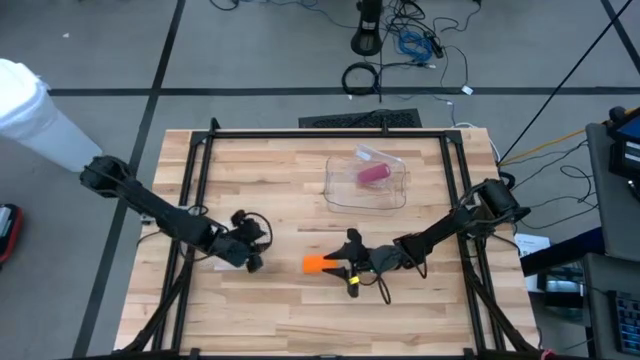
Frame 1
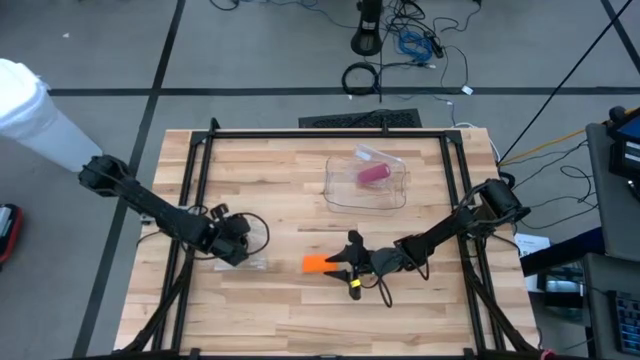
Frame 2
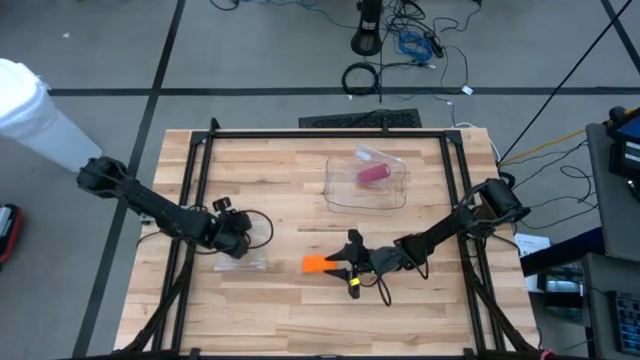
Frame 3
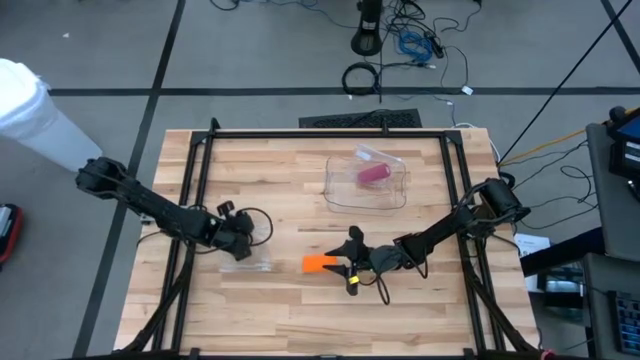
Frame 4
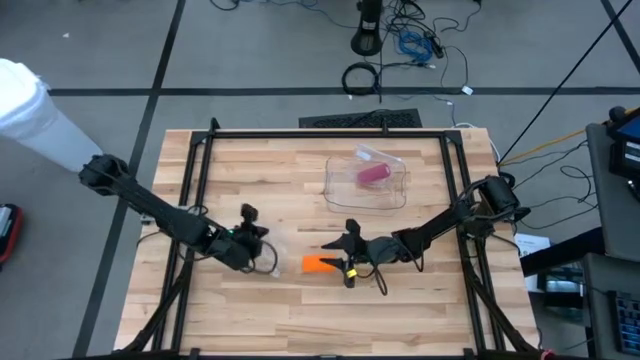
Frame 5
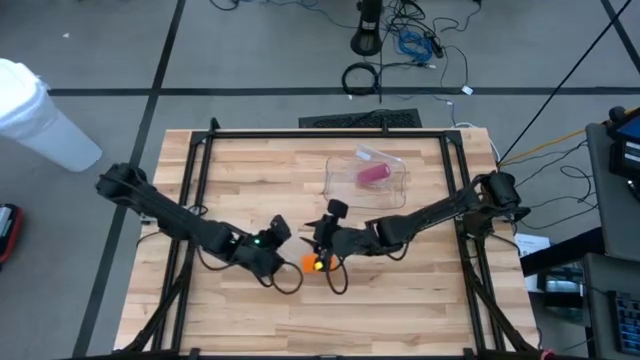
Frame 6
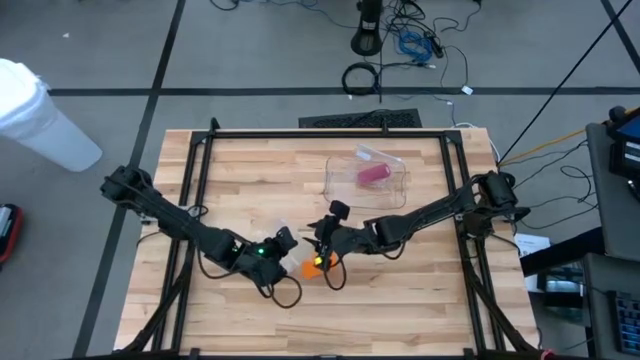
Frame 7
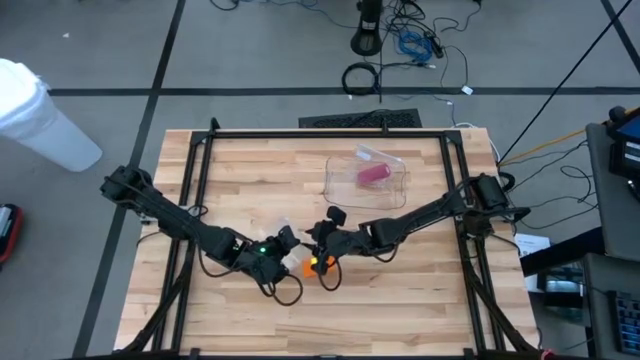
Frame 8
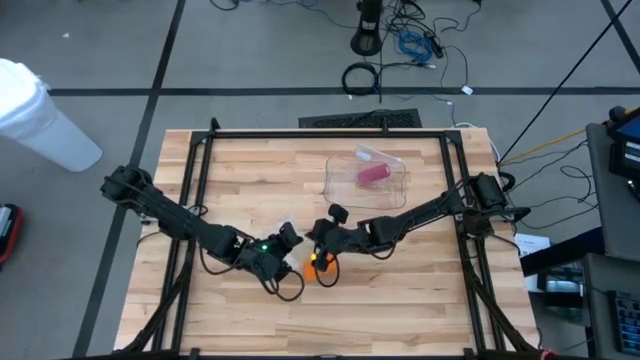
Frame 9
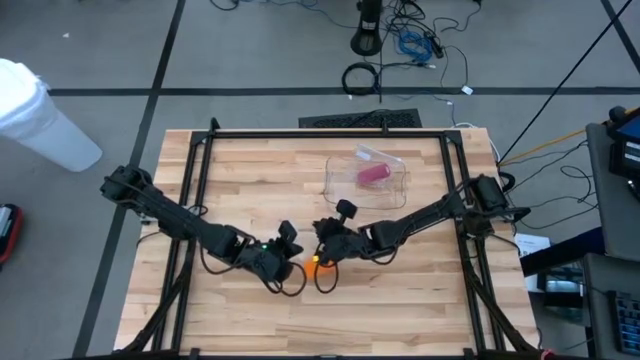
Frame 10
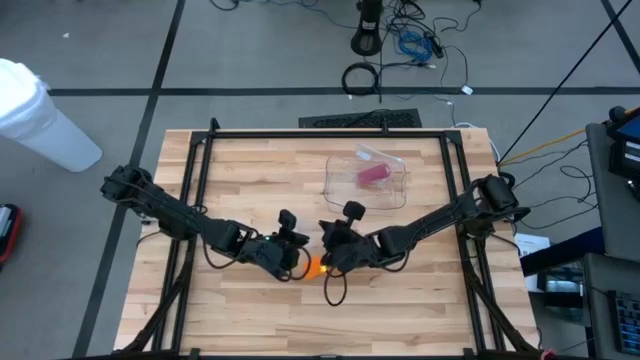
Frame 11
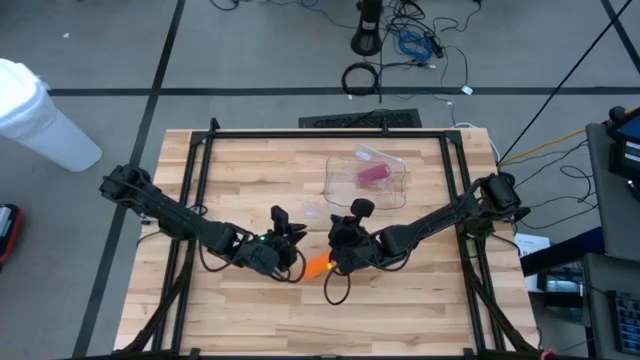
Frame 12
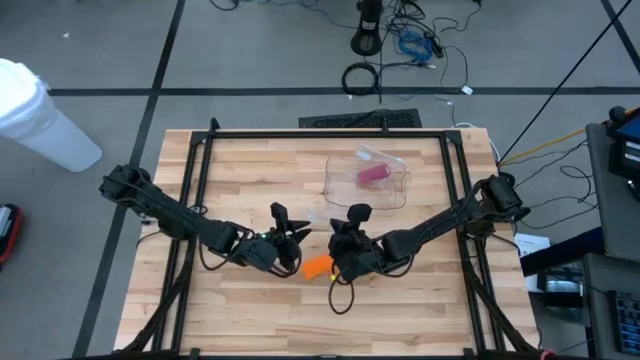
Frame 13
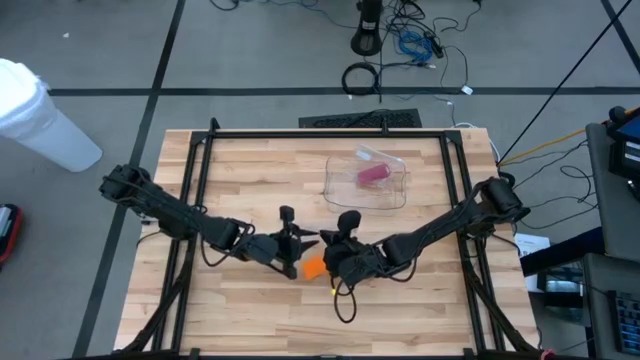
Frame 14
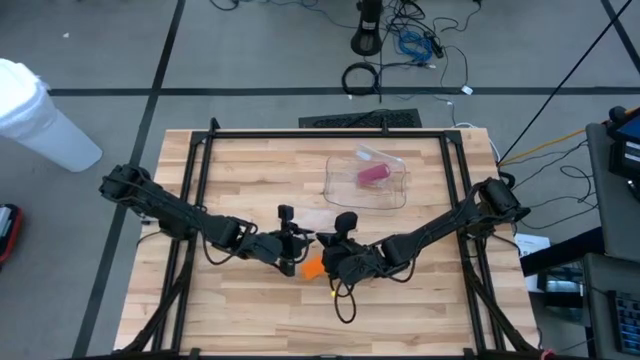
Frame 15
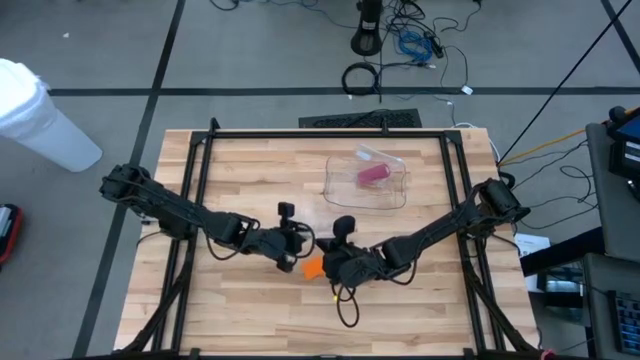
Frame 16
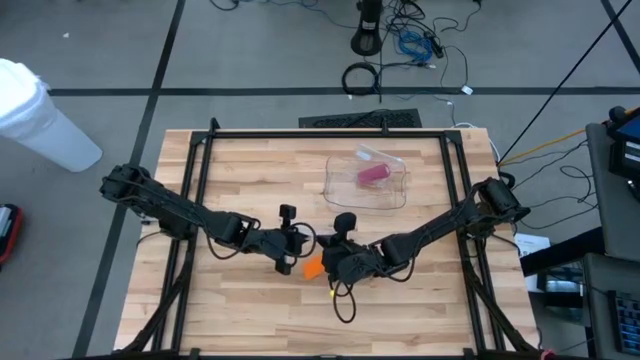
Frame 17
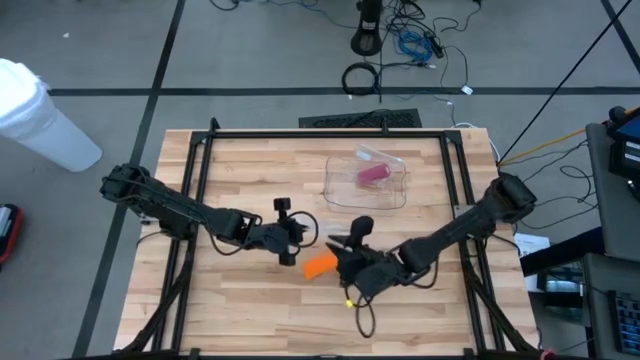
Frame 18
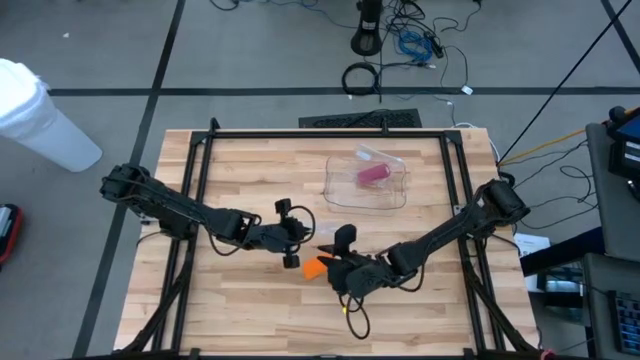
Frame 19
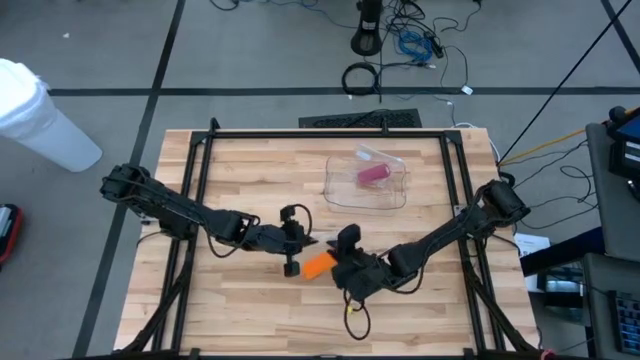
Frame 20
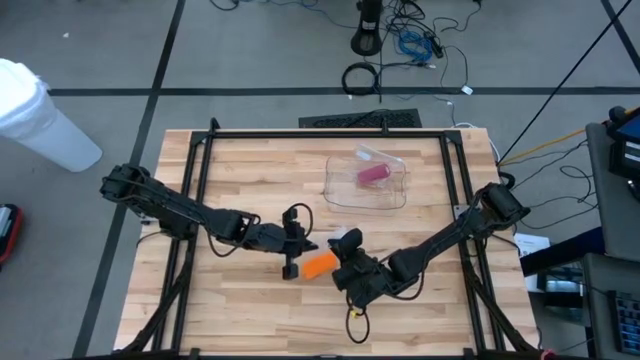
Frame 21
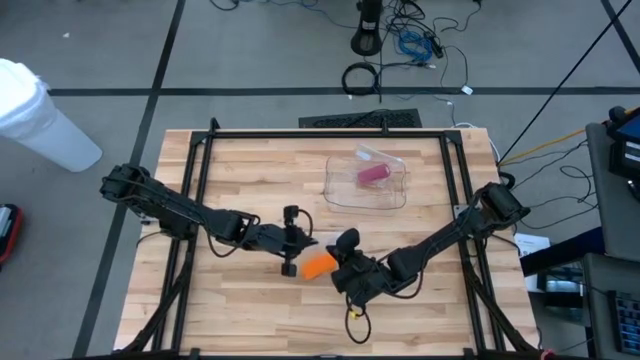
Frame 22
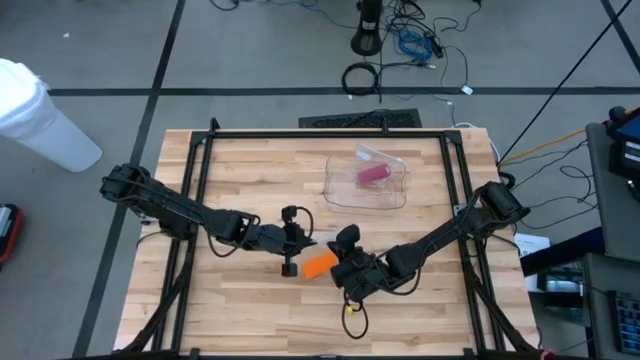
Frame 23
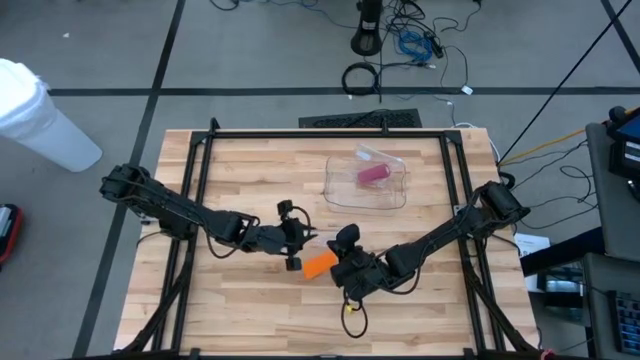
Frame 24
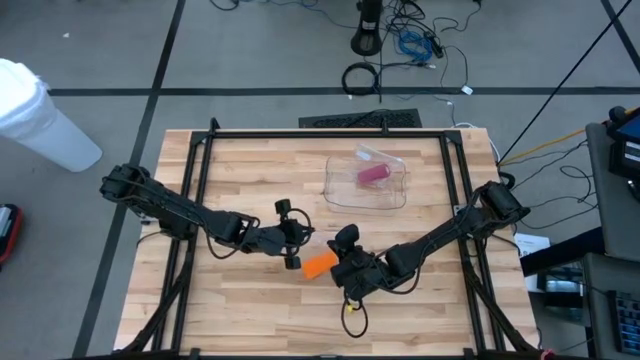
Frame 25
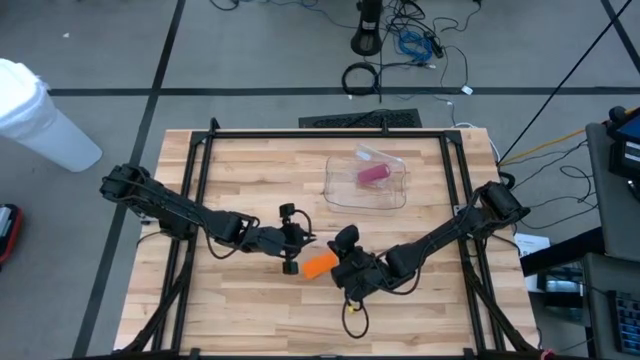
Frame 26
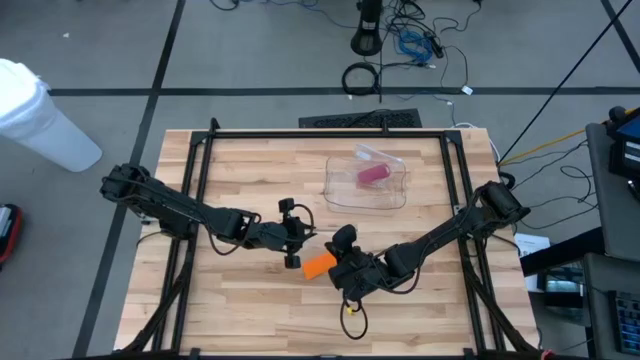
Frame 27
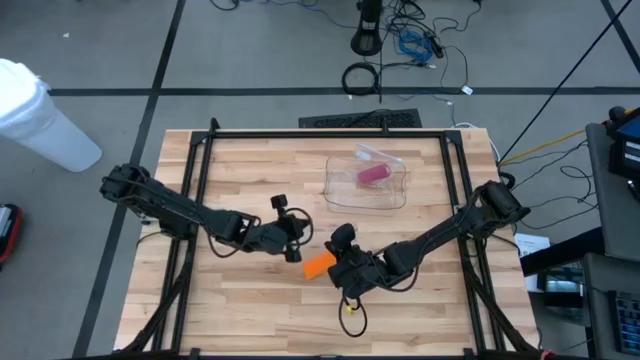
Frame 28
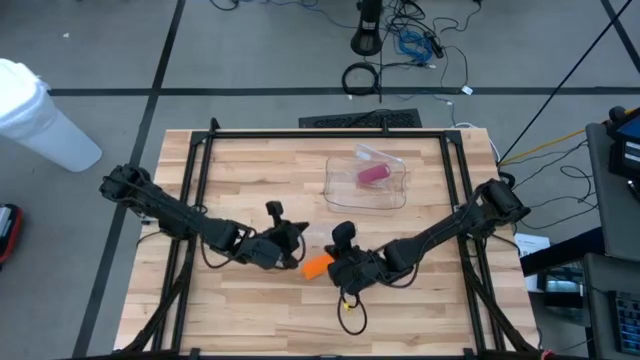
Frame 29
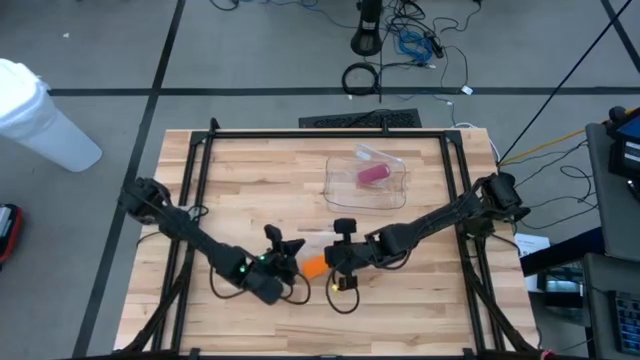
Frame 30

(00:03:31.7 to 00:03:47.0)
Task: Roll bandage
Open the transparent zip bag

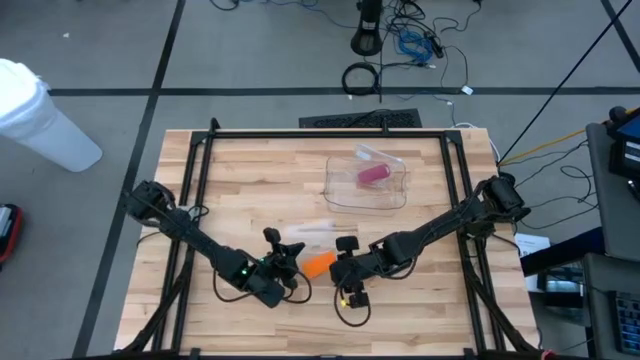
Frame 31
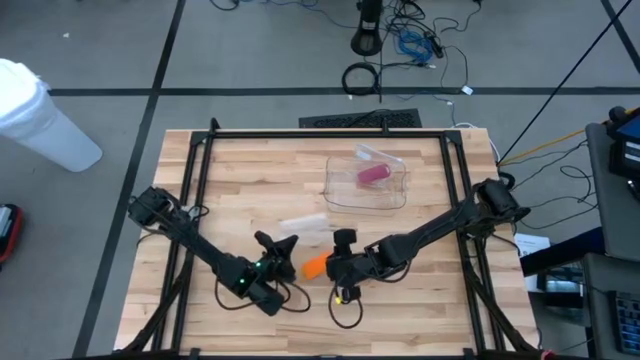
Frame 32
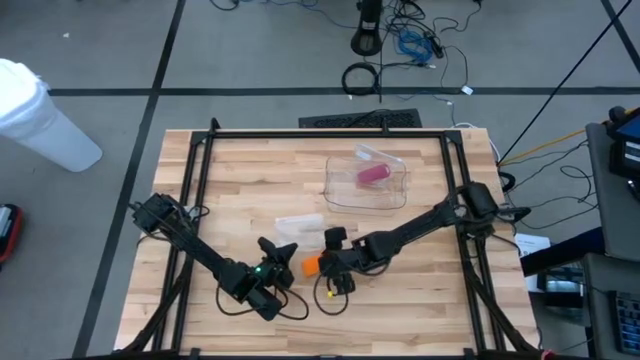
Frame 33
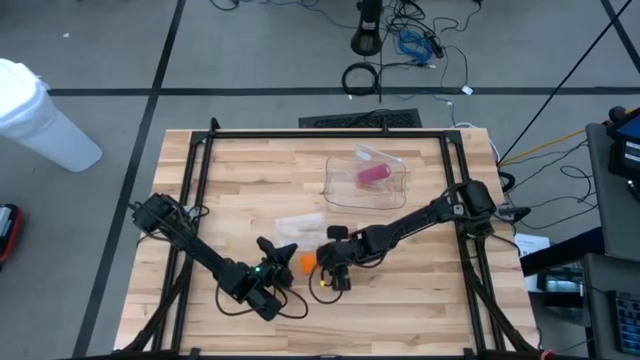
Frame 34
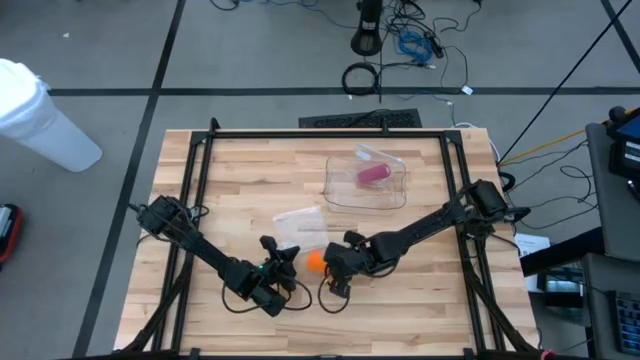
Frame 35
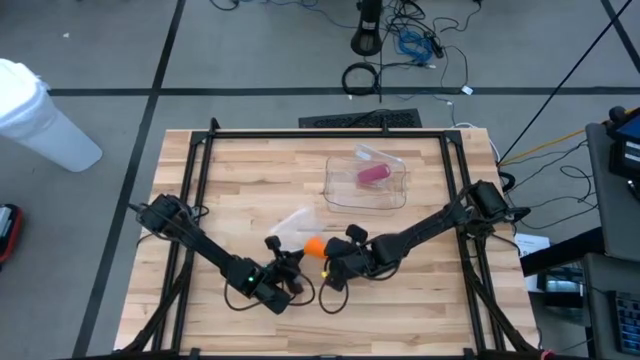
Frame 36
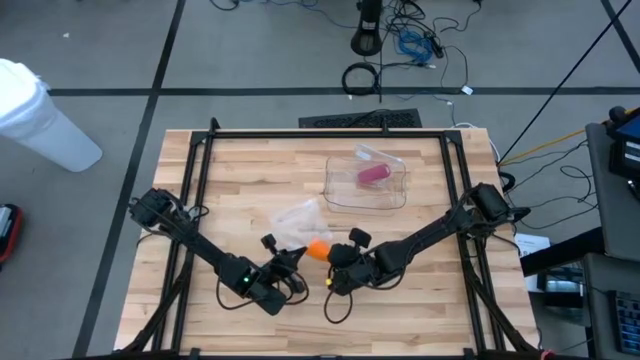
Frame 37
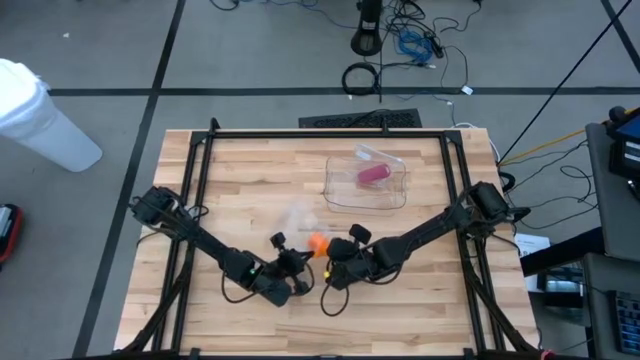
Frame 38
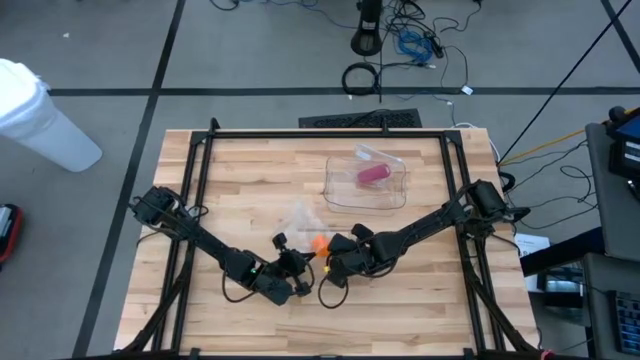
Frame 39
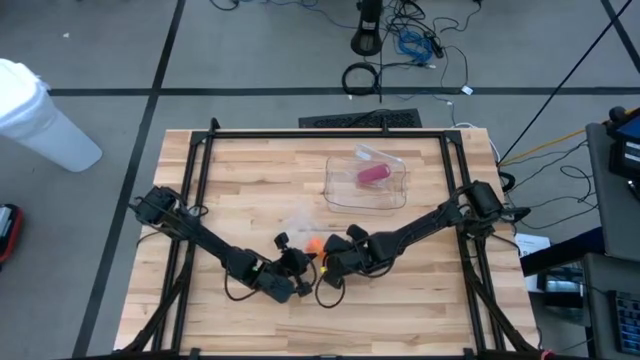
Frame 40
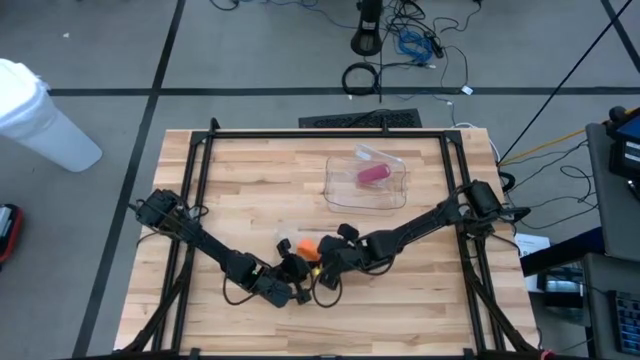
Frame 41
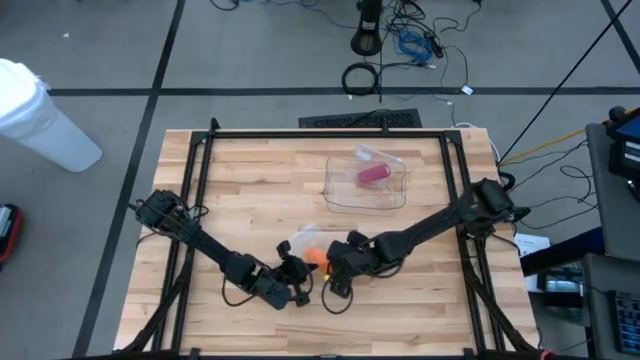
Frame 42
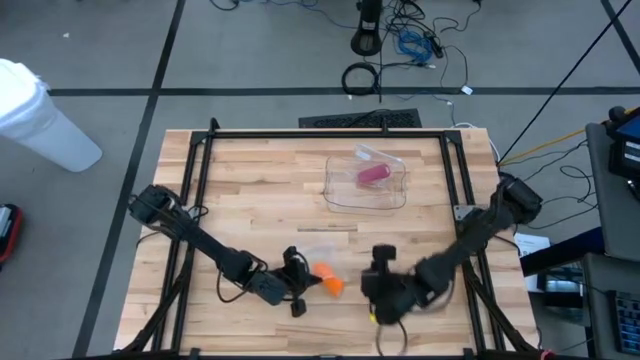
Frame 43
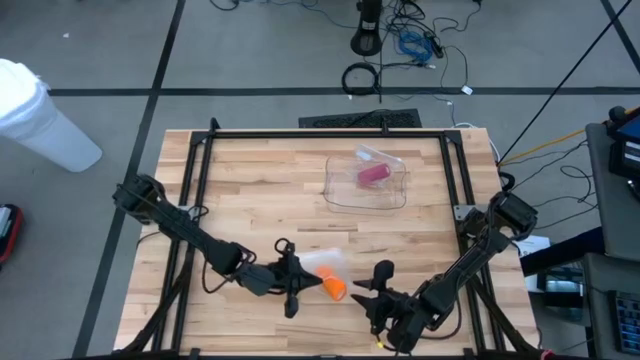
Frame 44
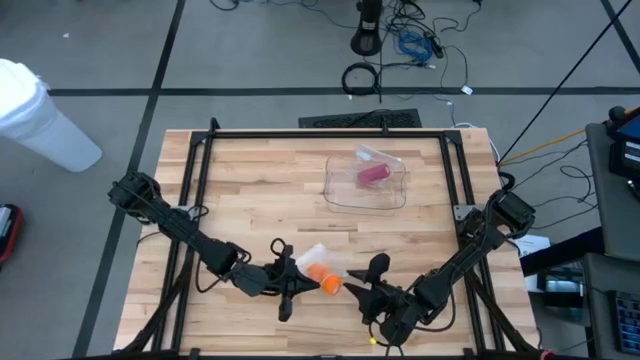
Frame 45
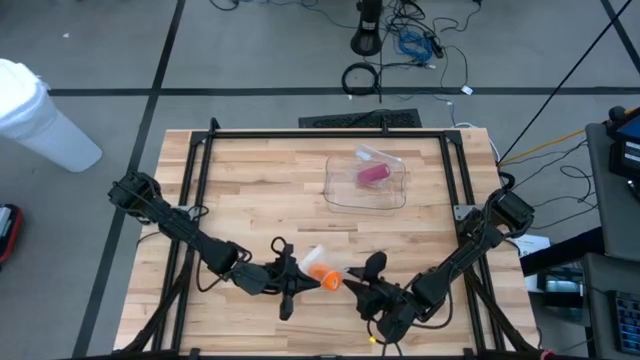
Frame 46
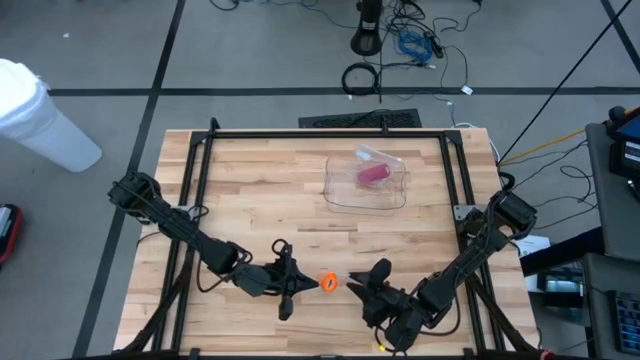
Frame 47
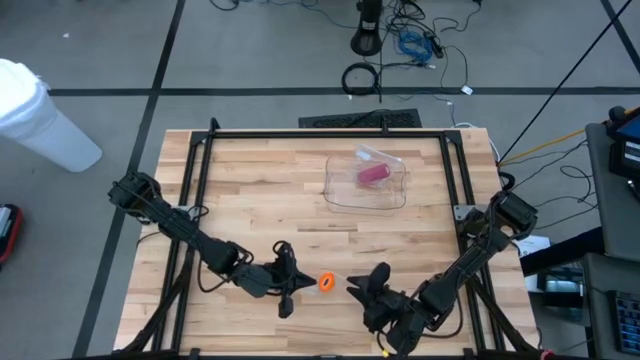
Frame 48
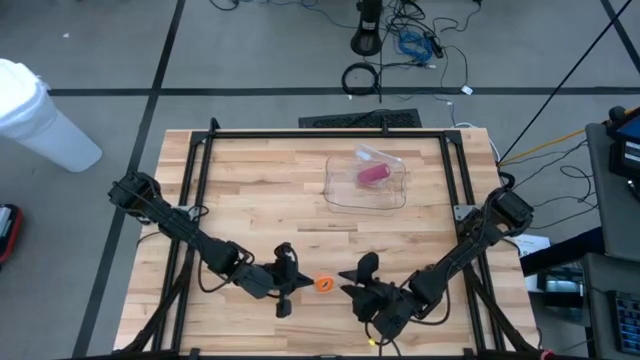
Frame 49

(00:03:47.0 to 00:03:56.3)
Put the rolled orange bandage into the transparent zip bag
